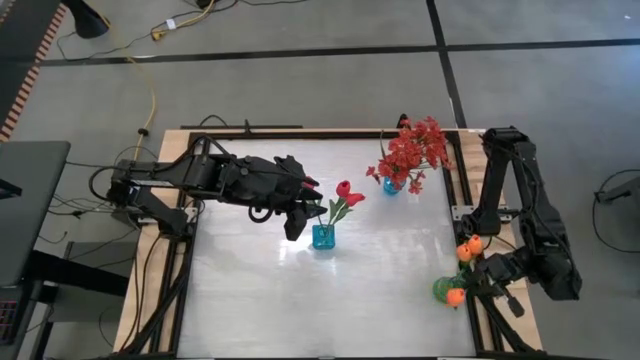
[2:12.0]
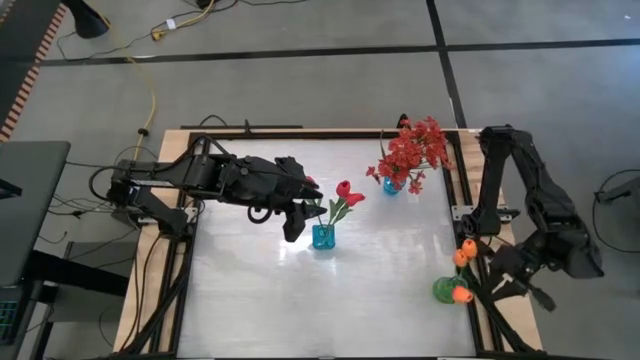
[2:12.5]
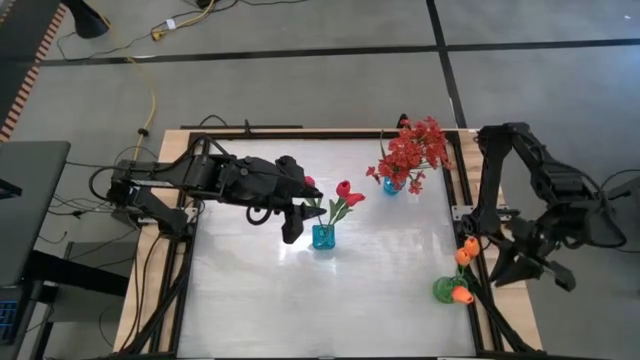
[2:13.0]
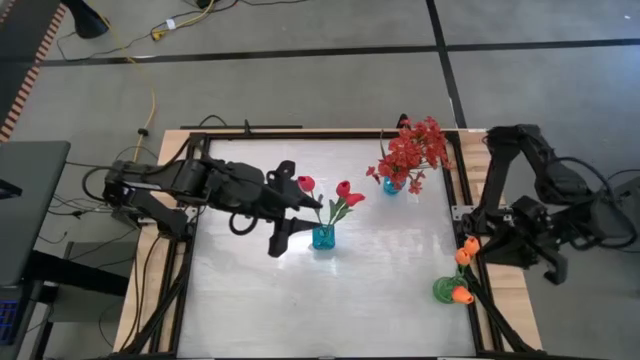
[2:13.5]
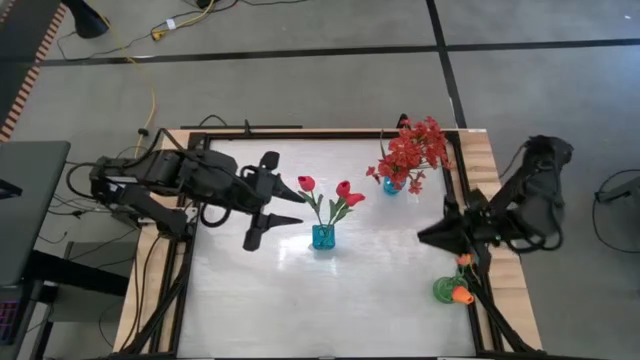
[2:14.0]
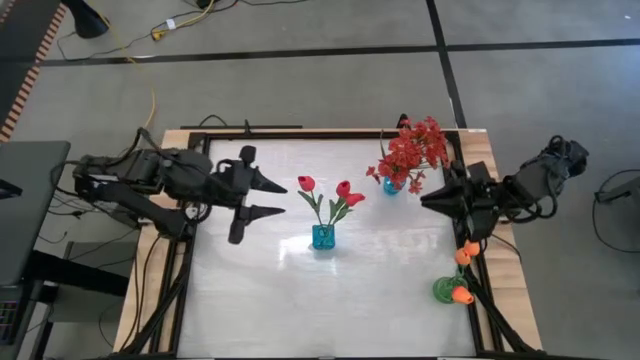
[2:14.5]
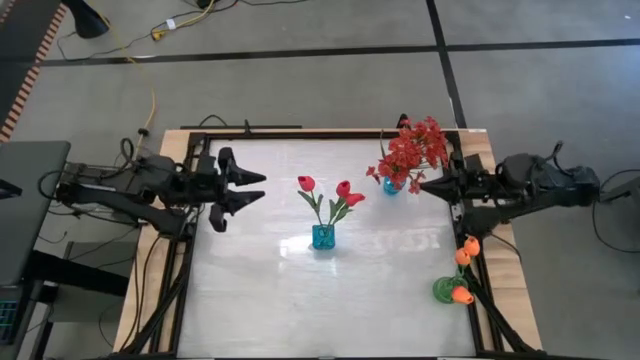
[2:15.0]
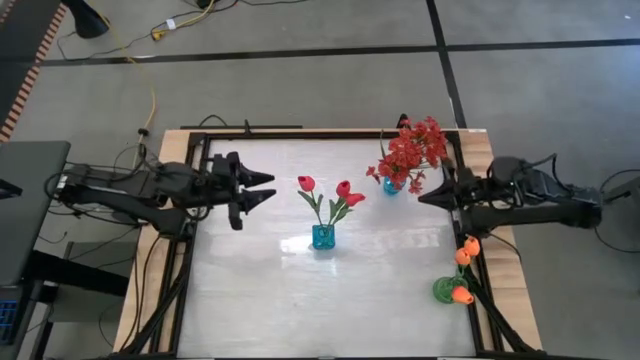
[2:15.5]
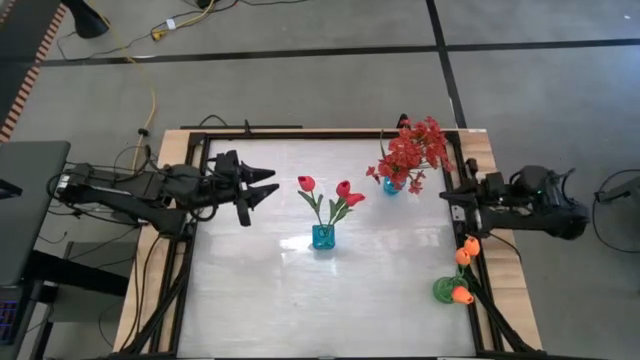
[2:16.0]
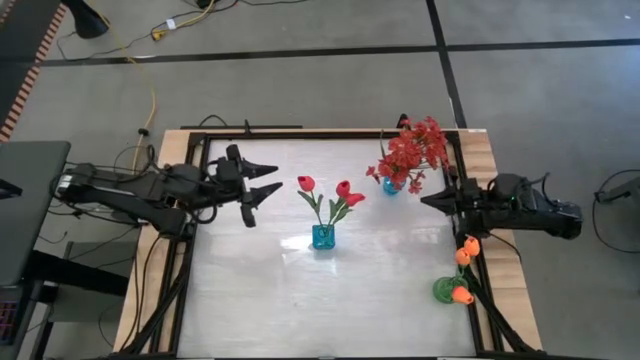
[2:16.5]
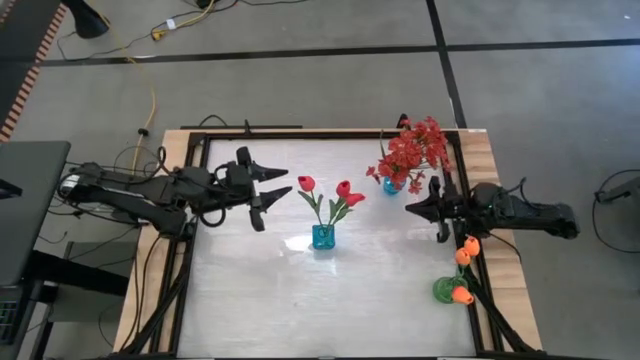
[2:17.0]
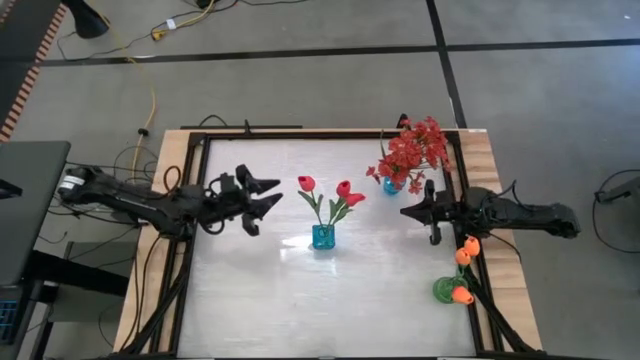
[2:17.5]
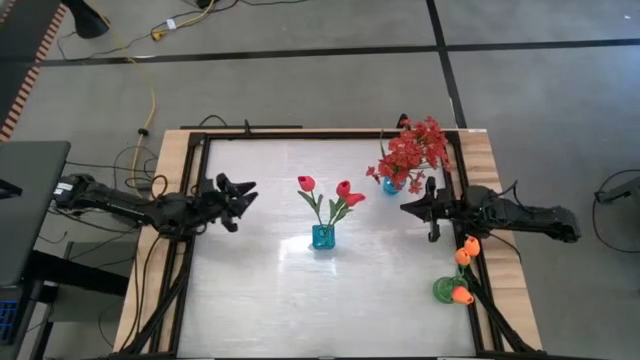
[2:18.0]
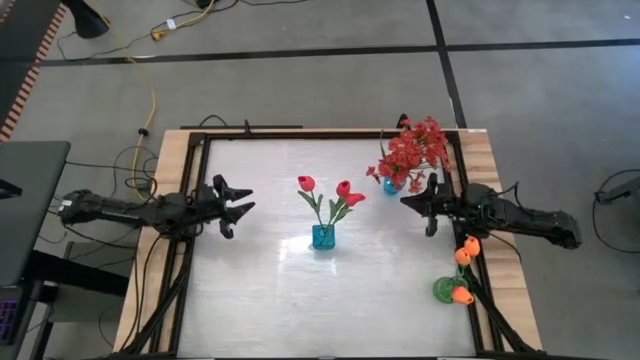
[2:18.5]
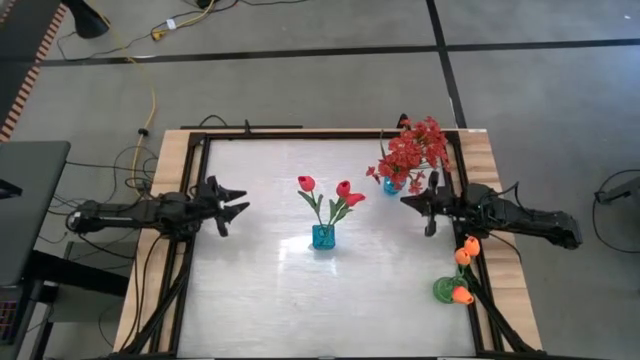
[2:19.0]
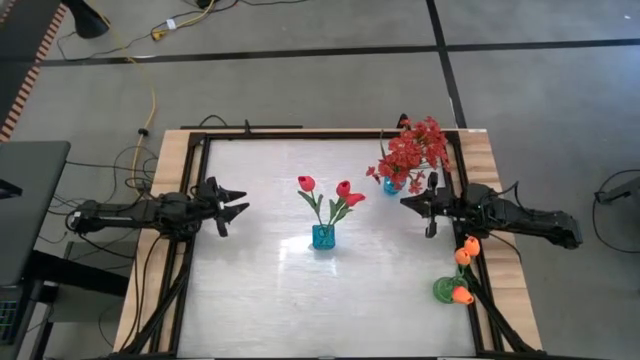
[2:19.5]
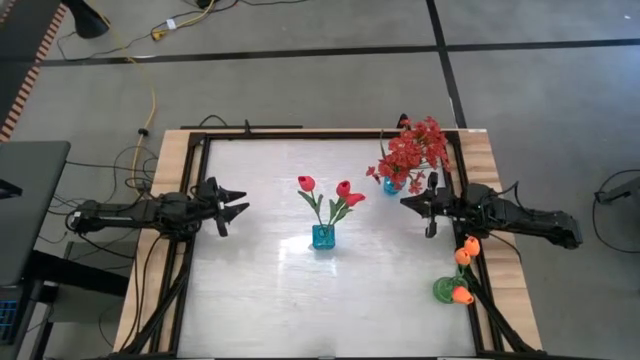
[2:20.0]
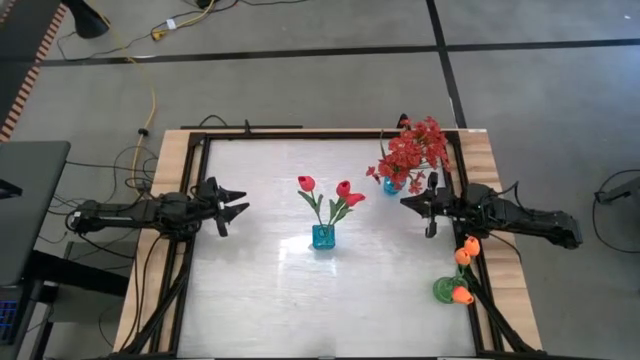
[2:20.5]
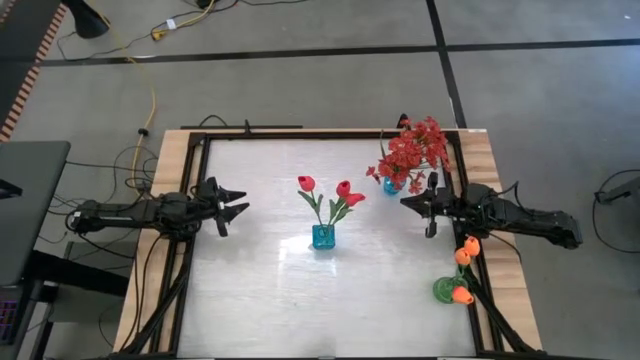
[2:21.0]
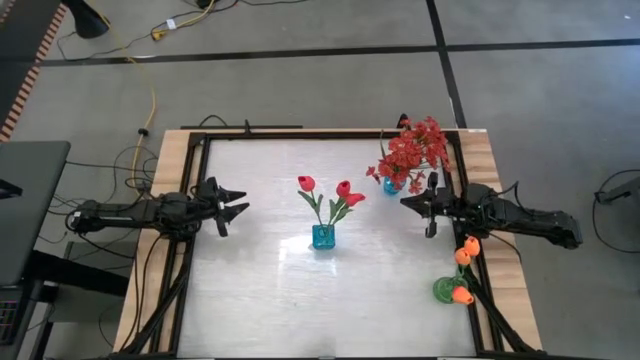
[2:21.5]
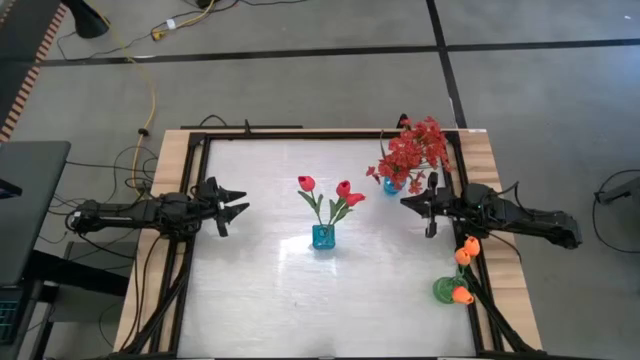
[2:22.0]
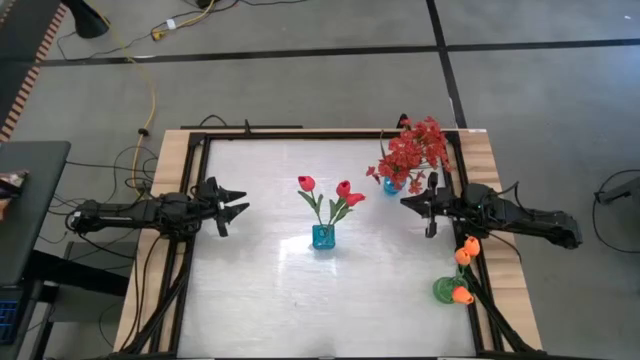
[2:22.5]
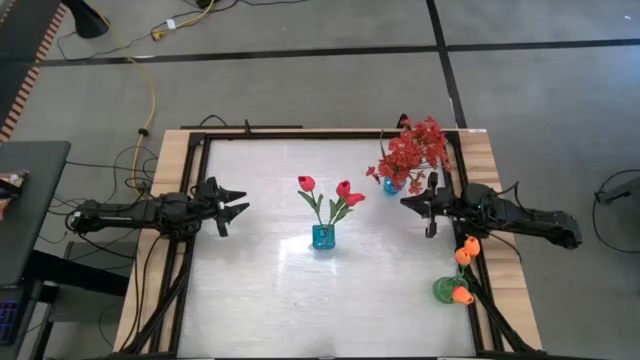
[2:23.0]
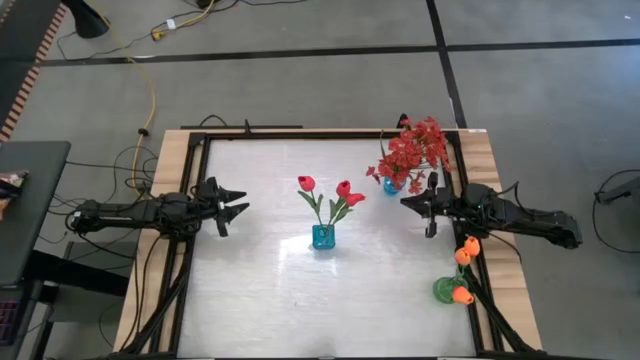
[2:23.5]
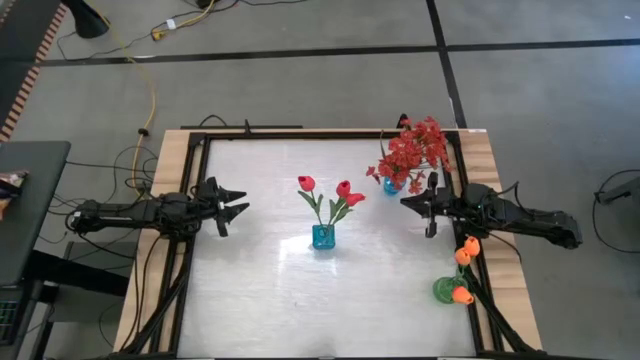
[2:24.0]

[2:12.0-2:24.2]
Task: Sort flowers into vase by color
Return to Home Position

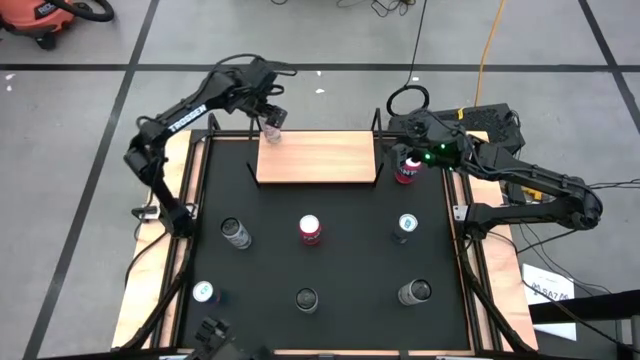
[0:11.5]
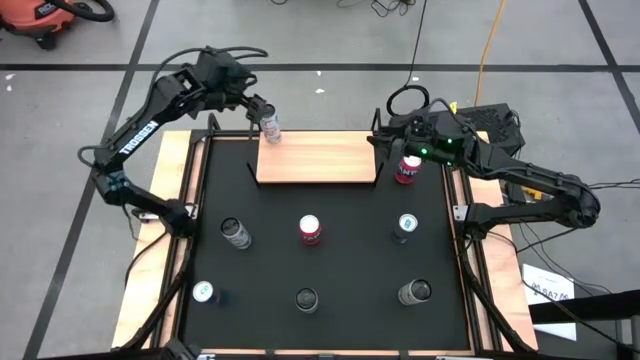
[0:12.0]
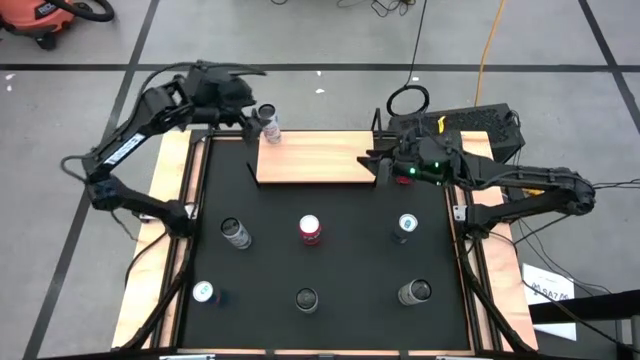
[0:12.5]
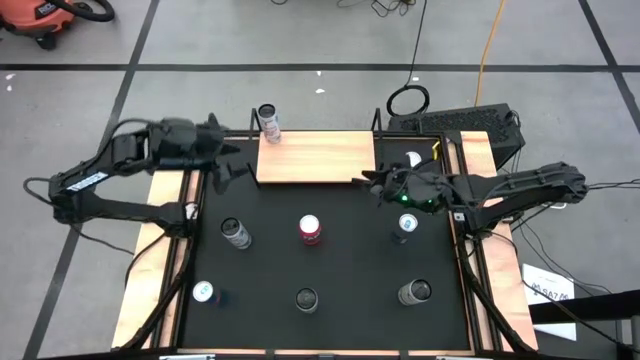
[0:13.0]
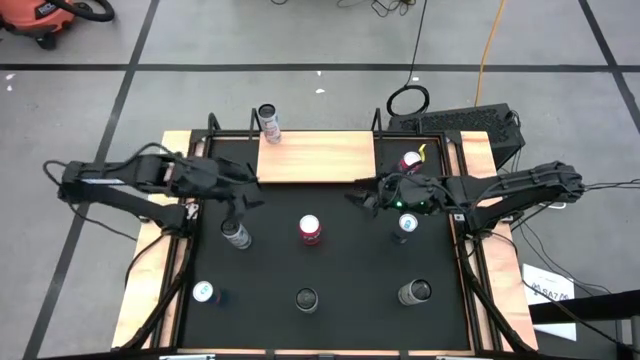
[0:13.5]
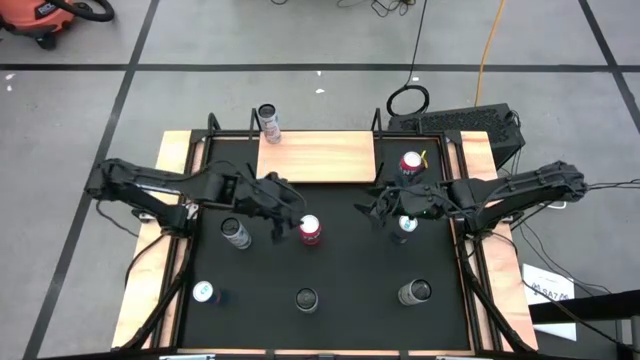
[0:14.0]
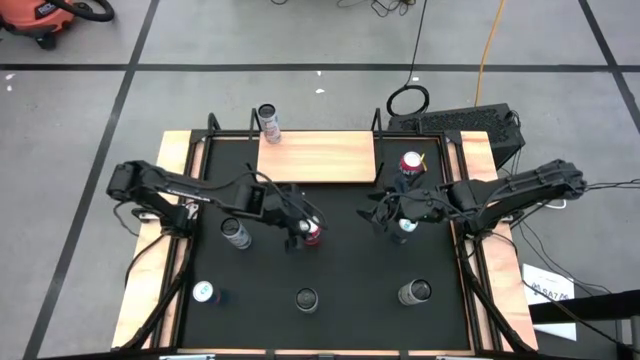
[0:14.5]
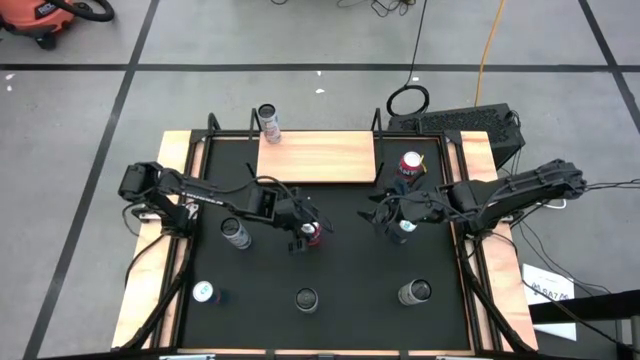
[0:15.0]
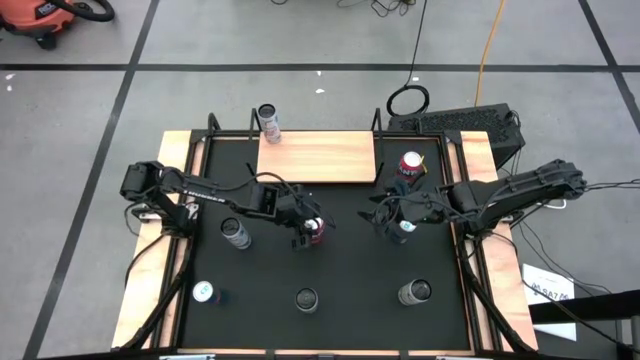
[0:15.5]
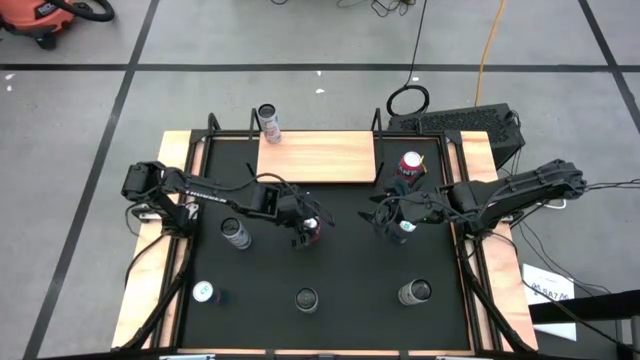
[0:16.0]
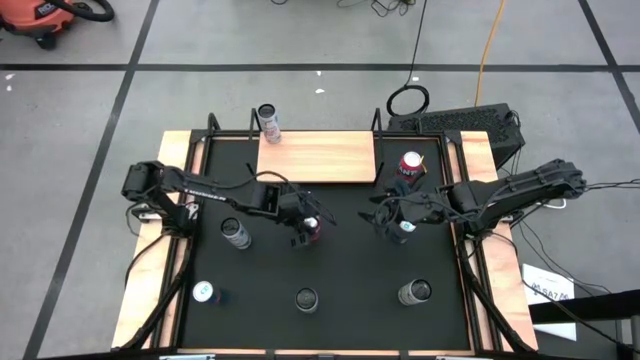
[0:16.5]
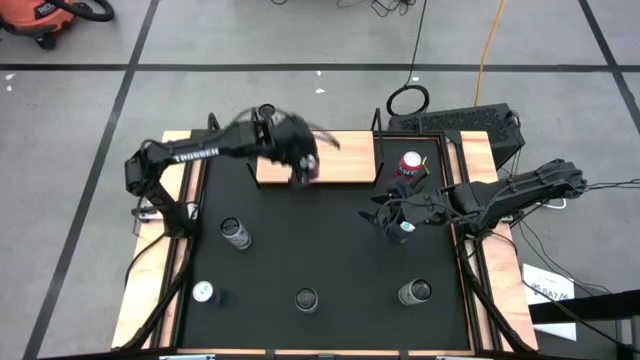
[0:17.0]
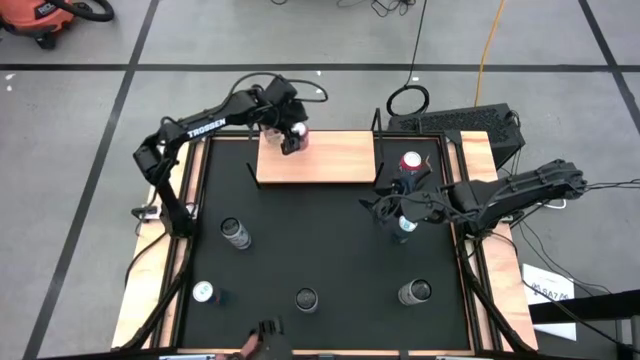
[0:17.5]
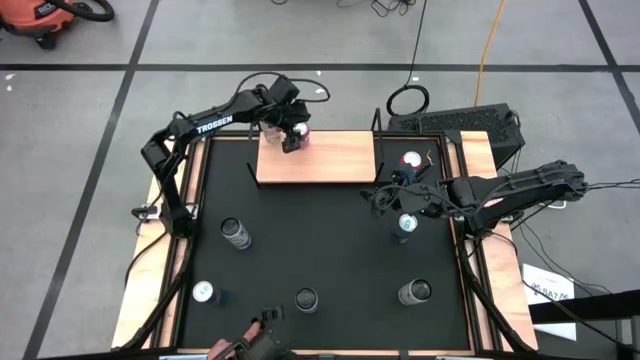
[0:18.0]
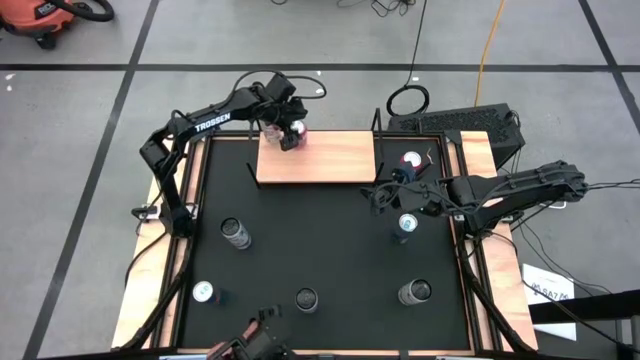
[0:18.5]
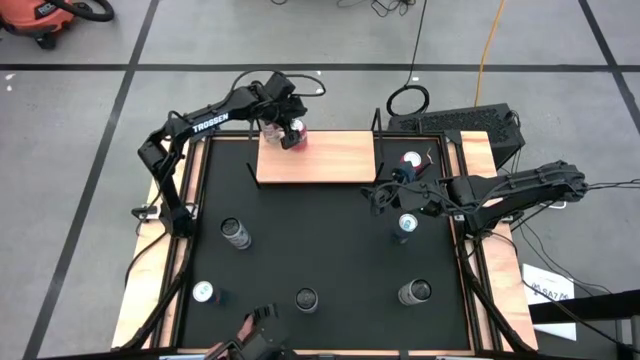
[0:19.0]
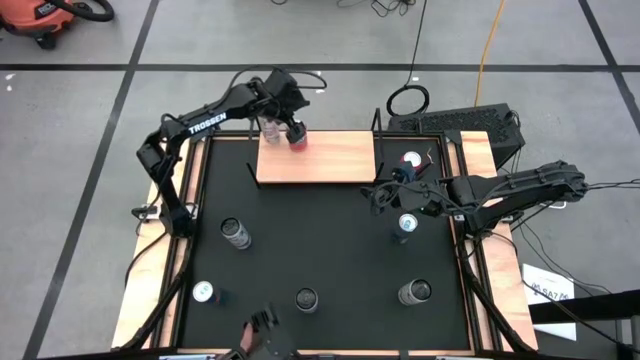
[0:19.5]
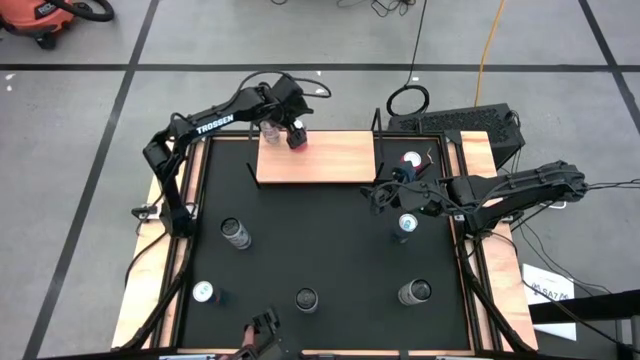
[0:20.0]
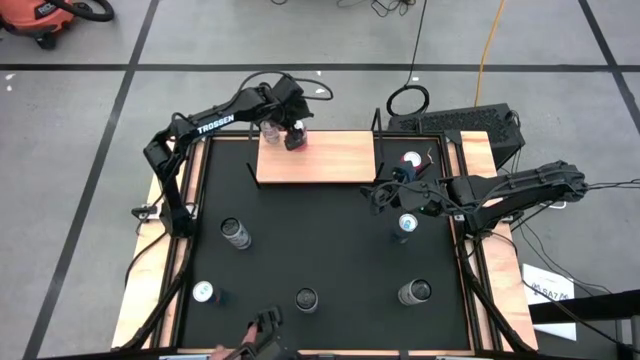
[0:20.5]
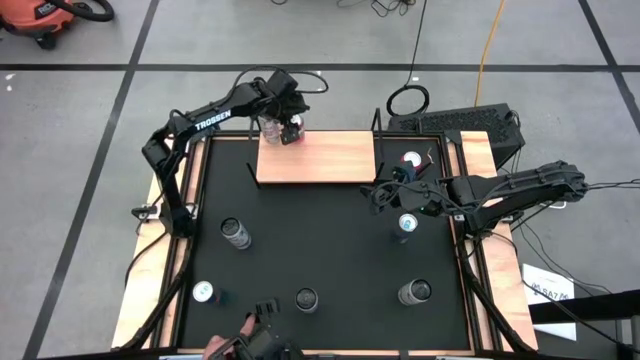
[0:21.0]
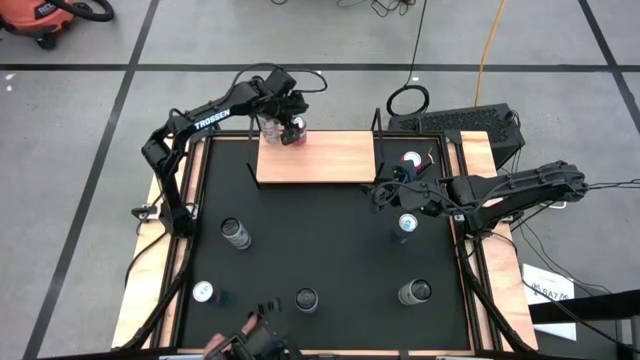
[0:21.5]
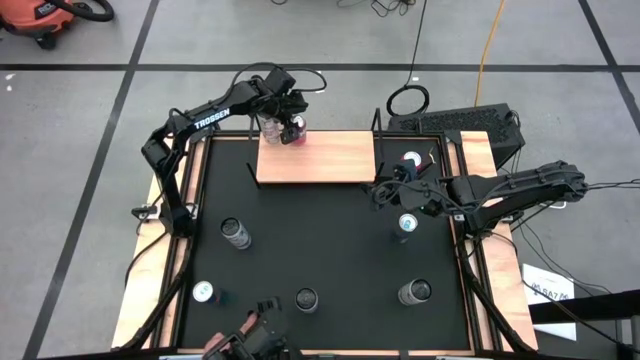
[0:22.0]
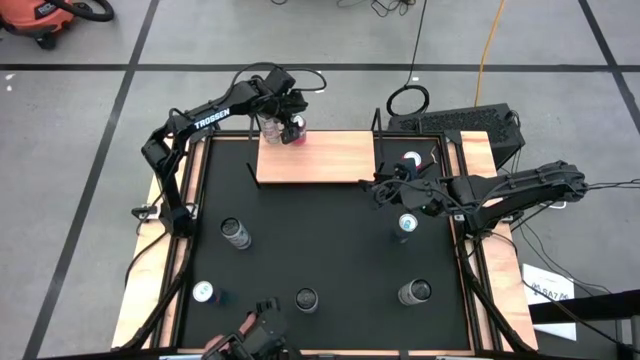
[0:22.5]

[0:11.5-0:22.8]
Task: Place canned beverage on shelf
Put the left Red soda can on the shelf
